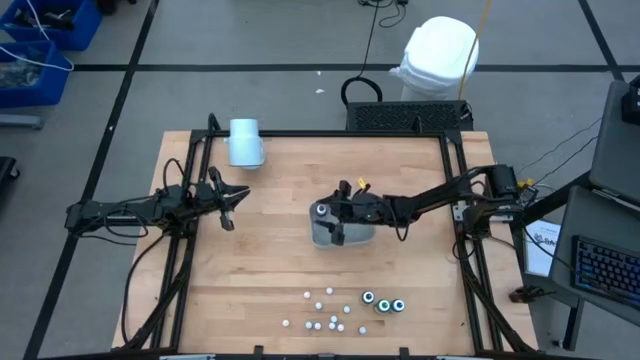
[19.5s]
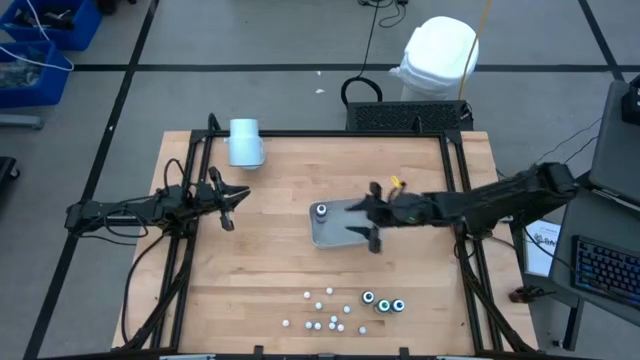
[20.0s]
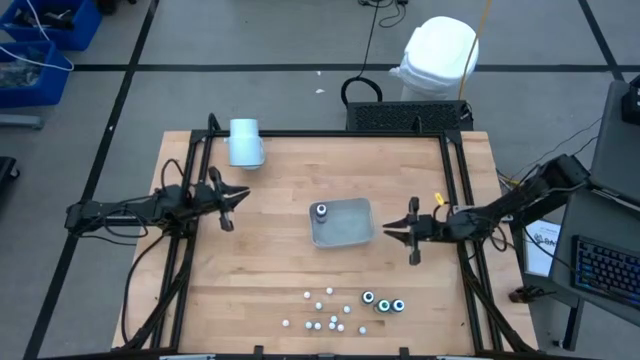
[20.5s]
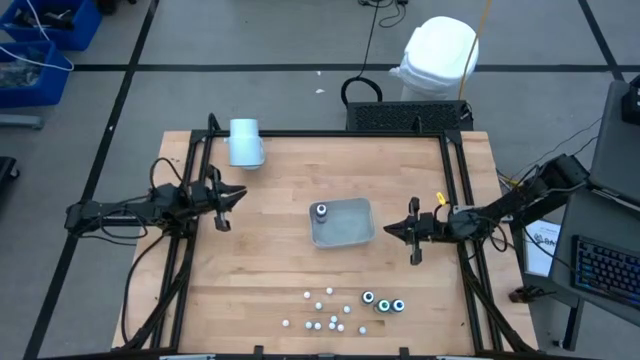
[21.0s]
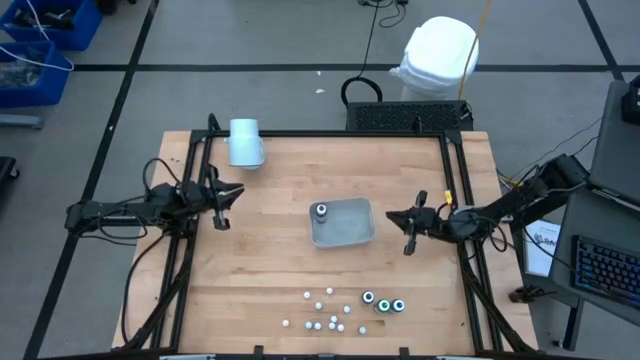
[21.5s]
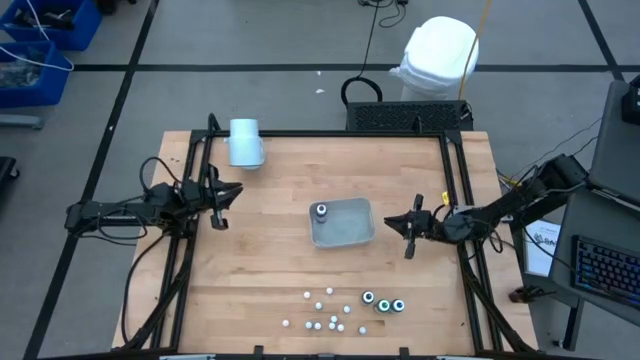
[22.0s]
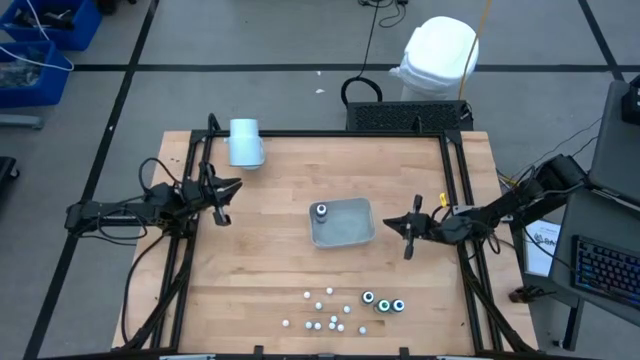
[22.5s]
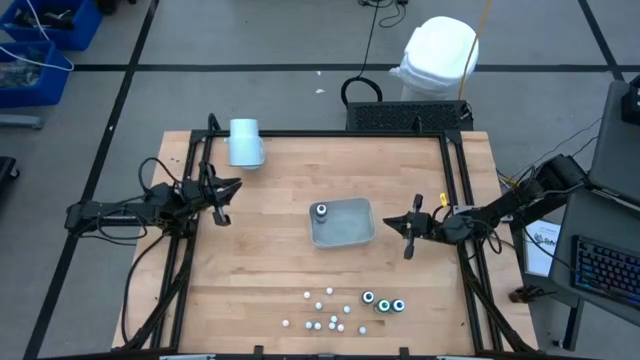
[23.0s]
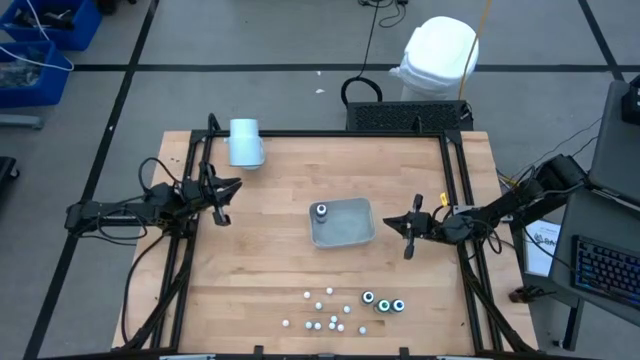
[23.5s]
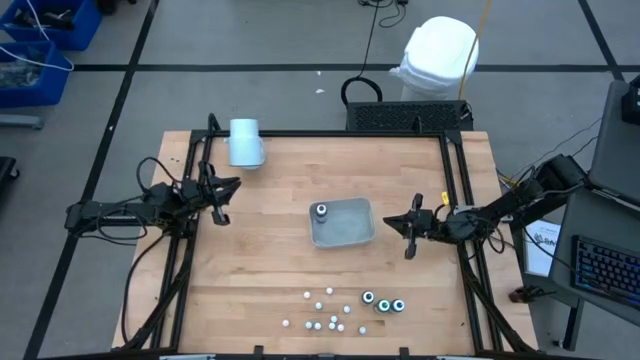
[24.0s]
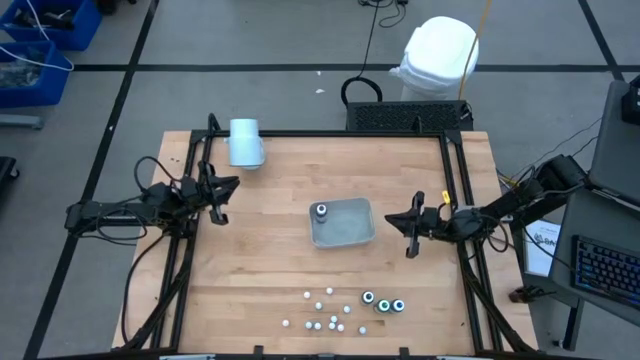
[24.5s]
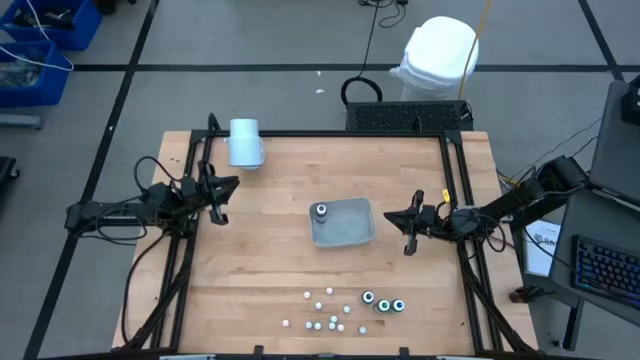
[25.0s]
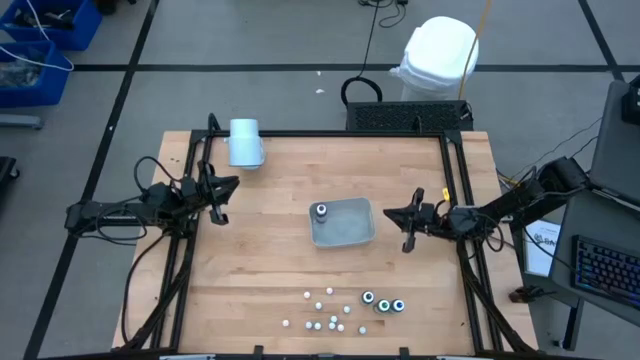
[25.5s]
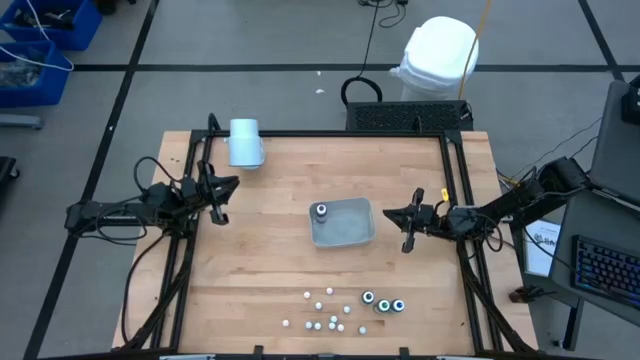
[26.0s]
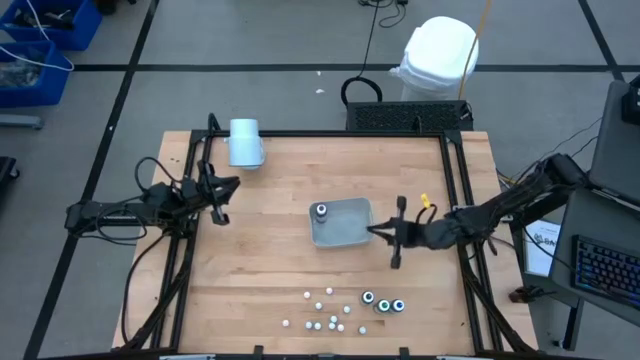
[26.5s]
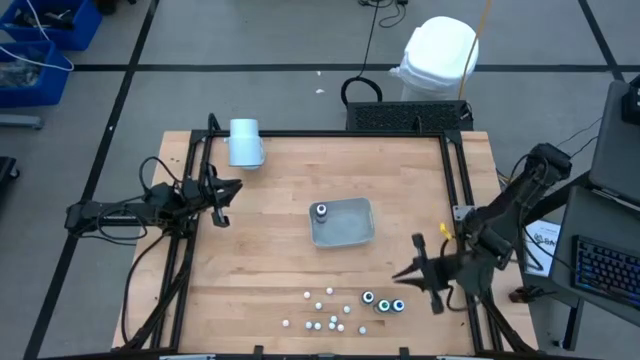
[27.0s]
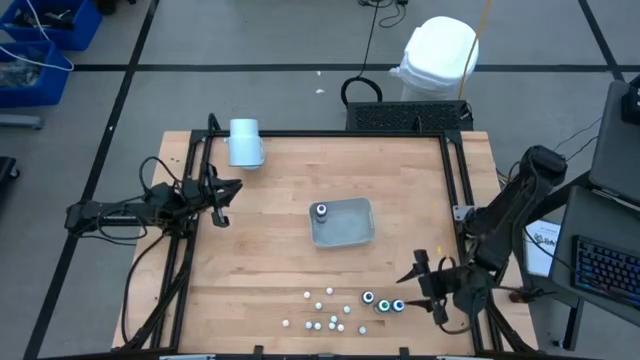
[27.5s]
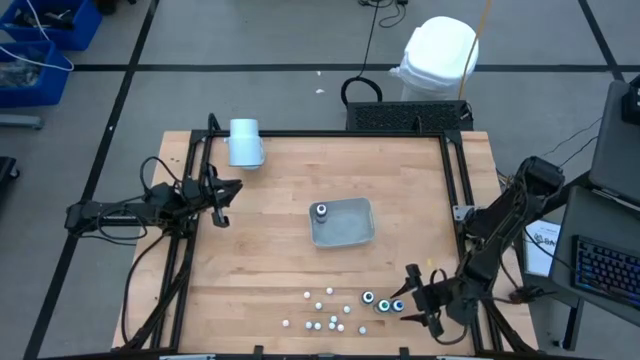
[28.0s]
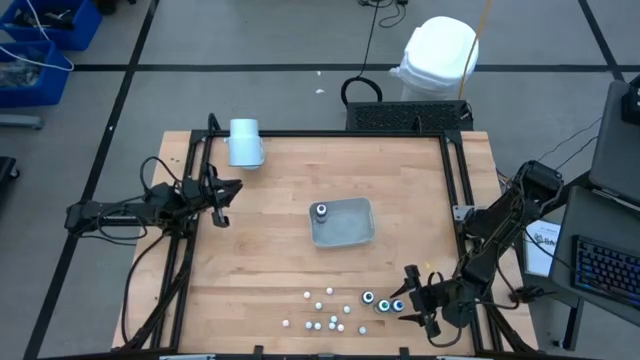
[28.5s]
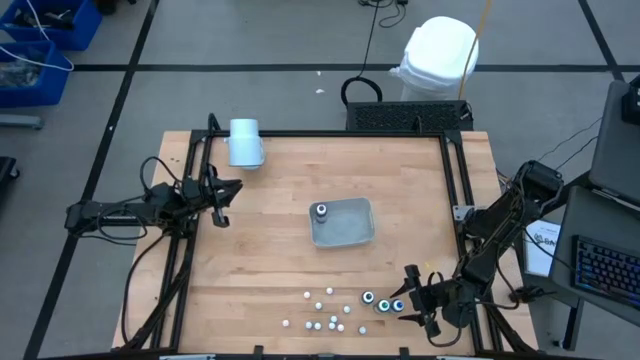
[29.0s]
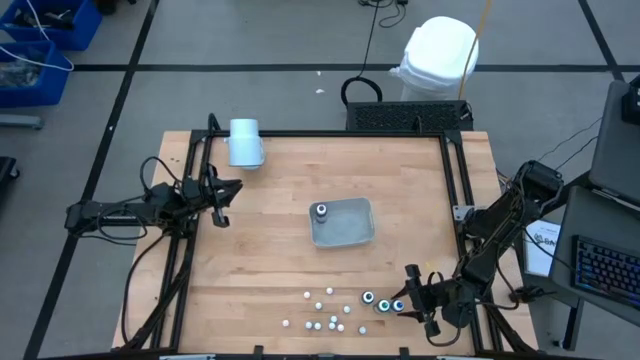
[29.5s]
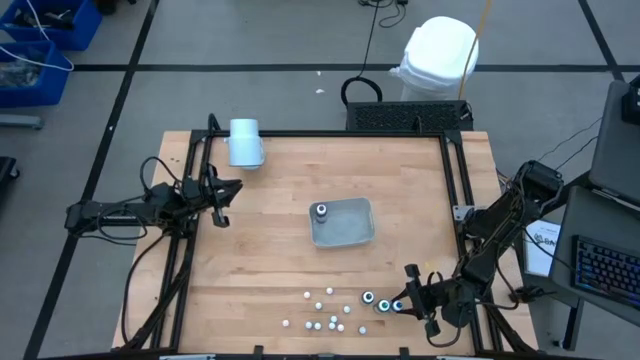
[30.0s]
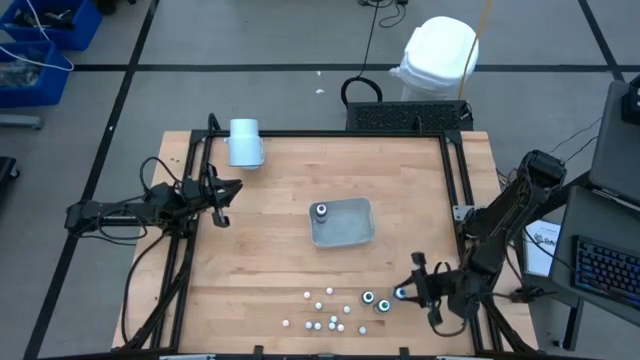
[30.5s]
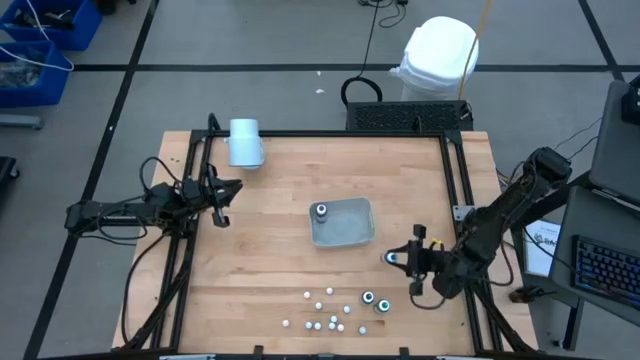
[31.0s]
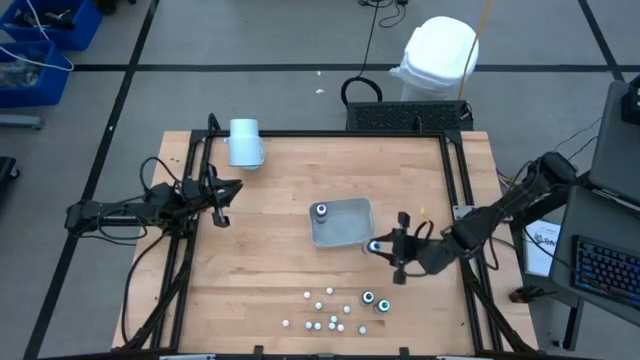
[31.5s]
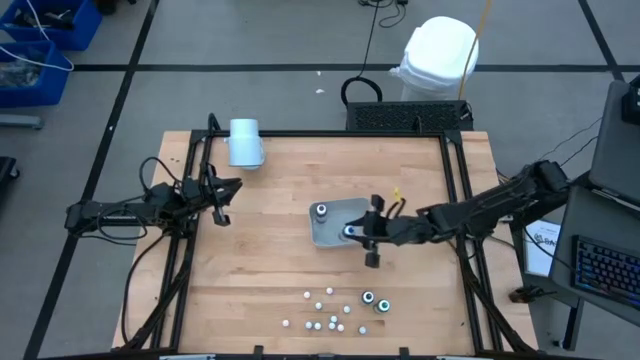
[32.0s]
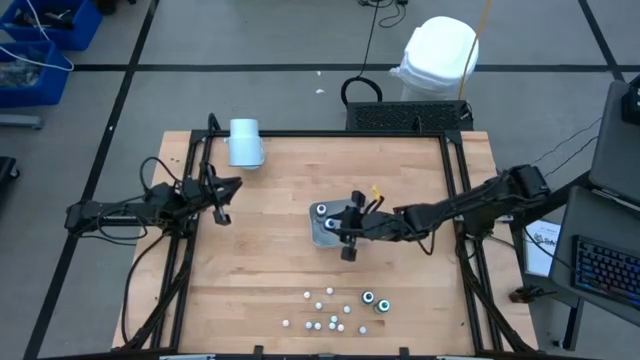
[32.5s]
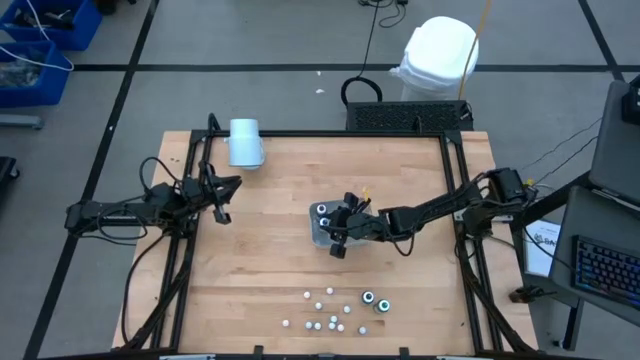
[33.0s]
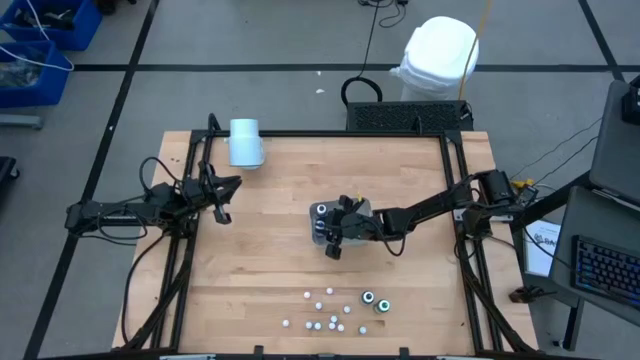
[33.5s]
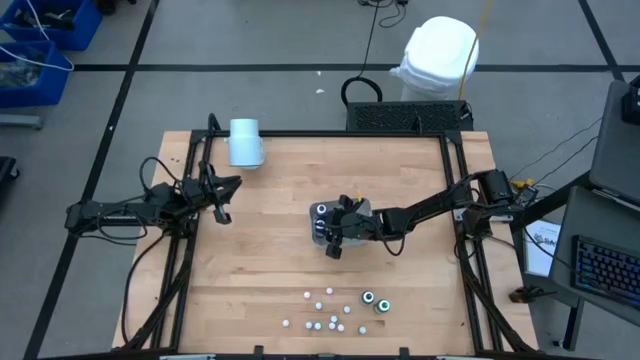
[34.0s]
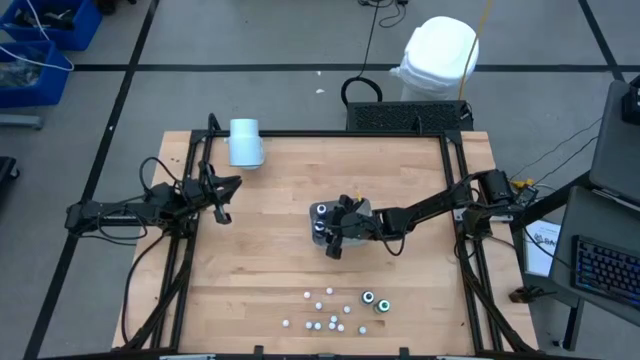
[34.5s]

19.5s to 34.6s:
Task: Pick & Place food coloring
Put the large blue food coloring bottle into the gray bin
